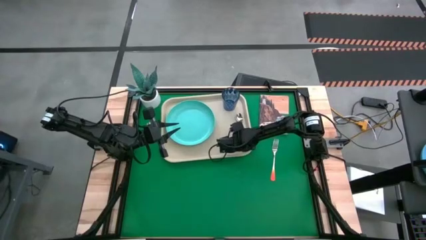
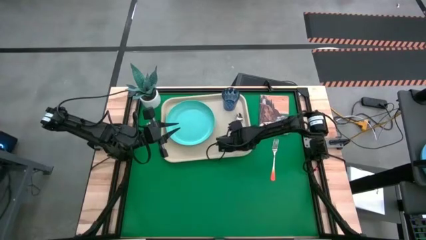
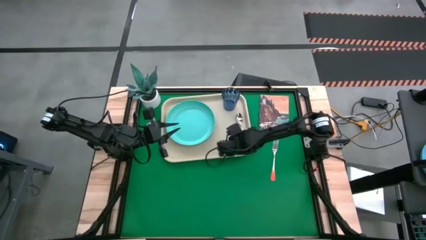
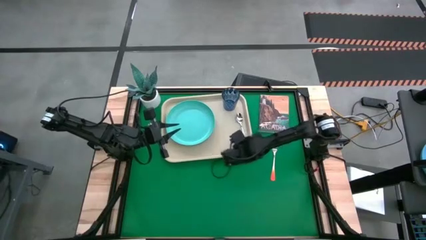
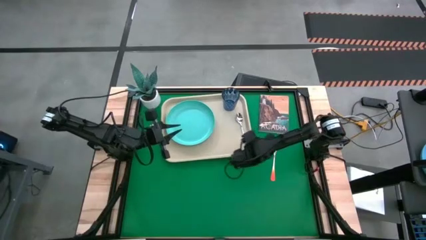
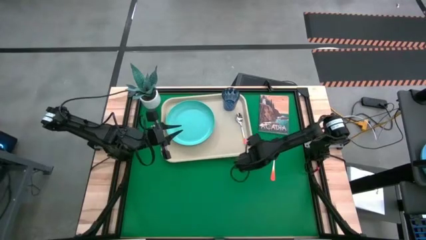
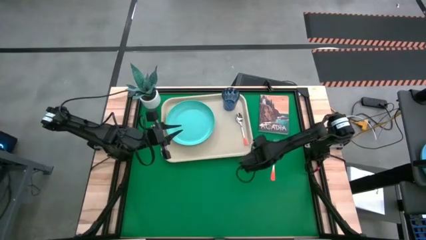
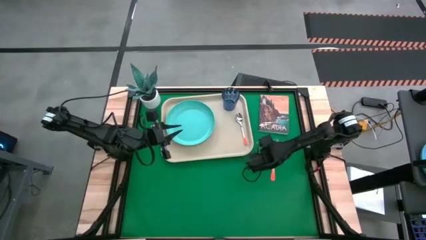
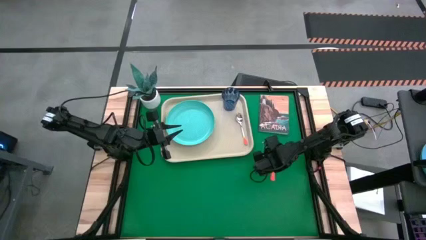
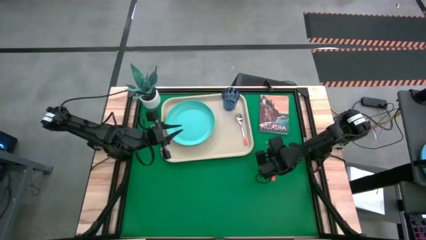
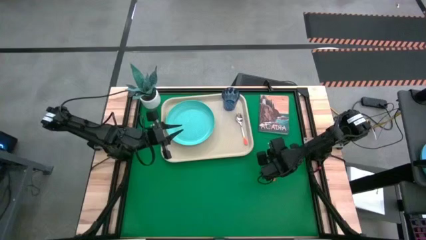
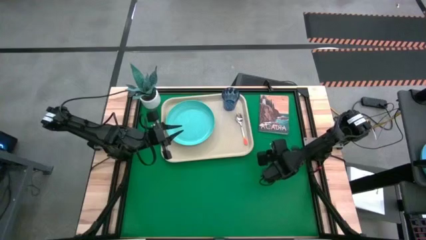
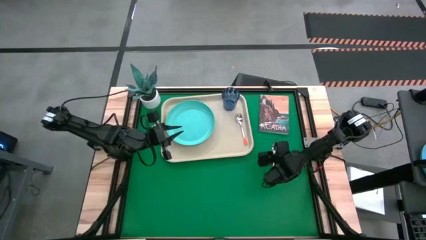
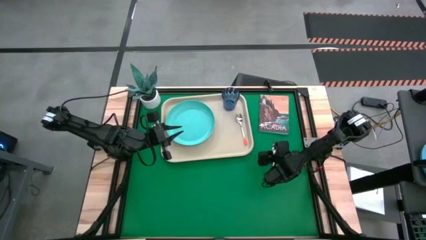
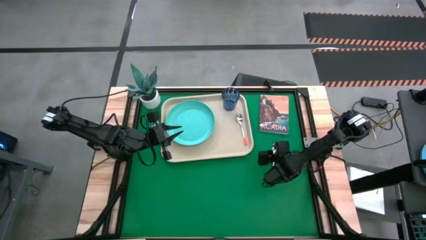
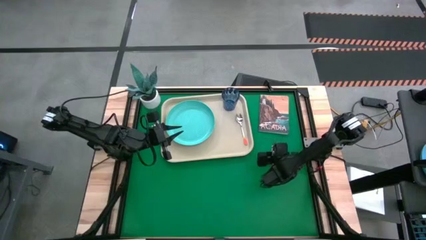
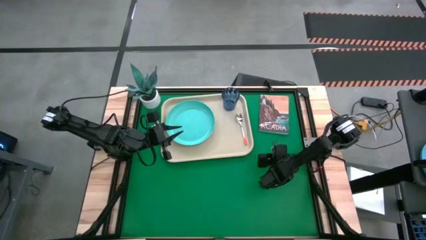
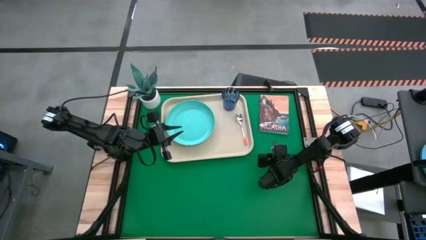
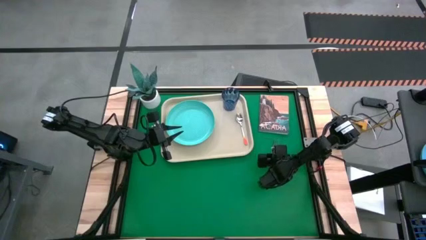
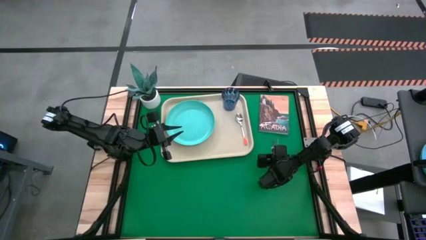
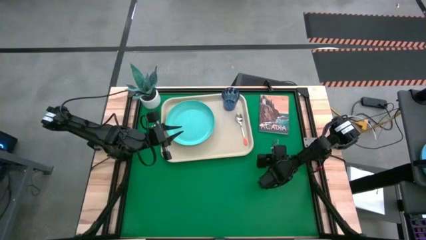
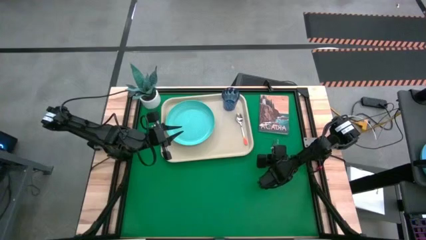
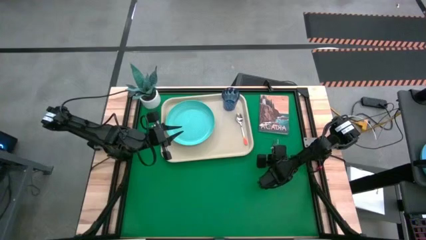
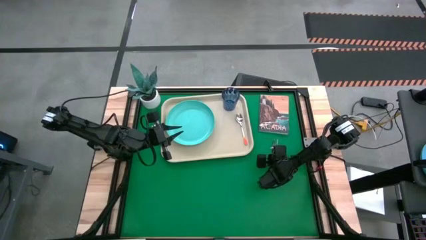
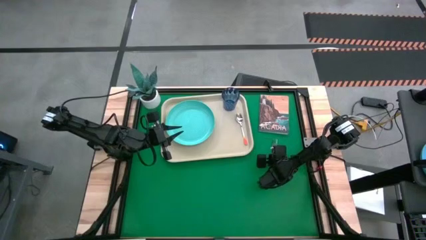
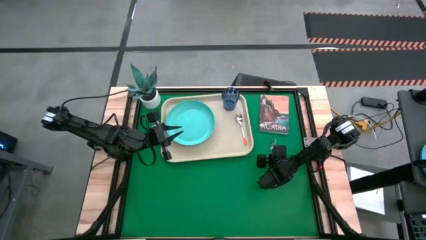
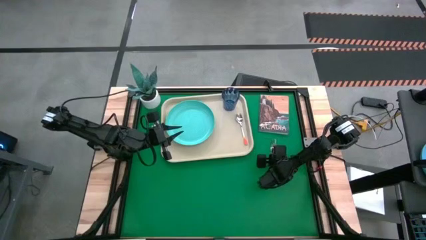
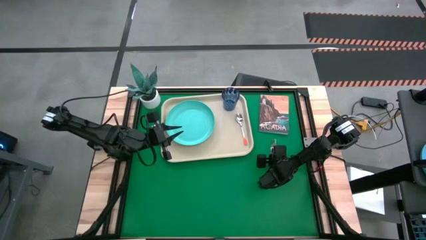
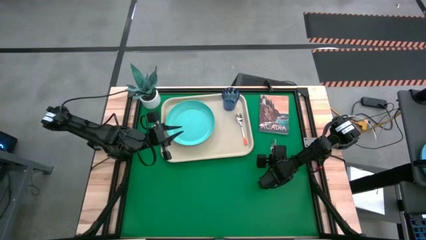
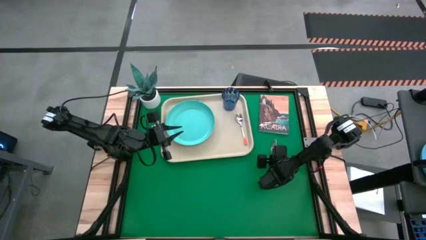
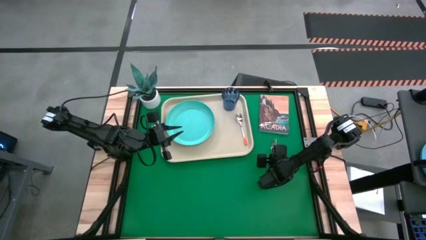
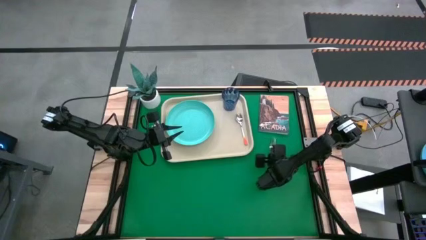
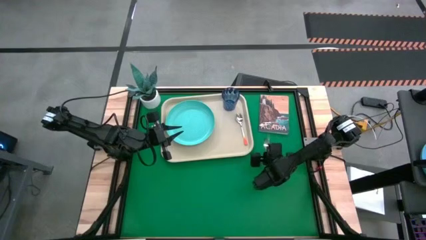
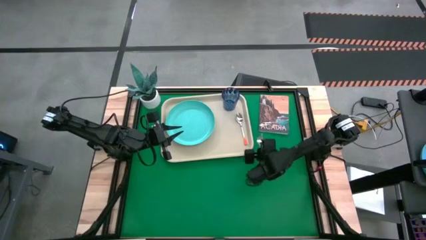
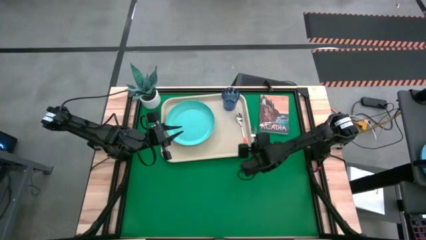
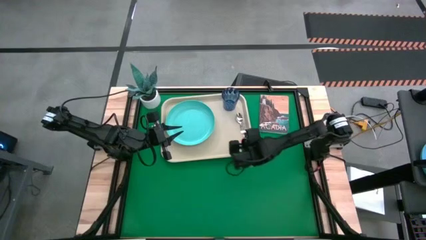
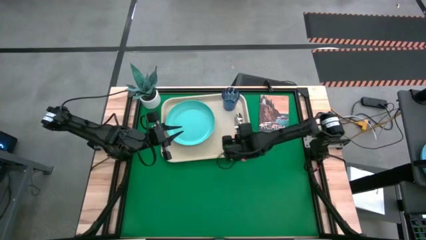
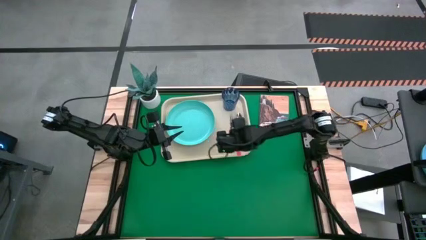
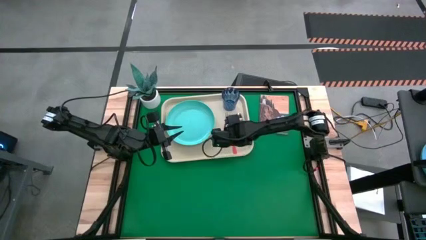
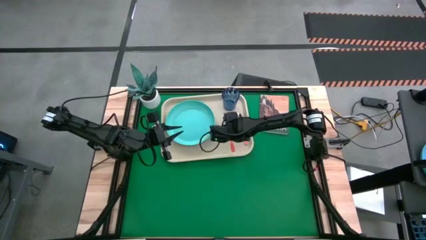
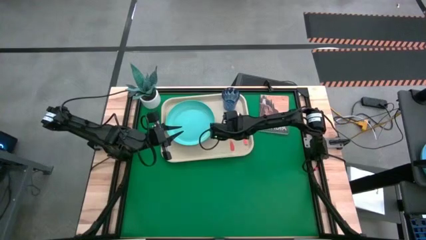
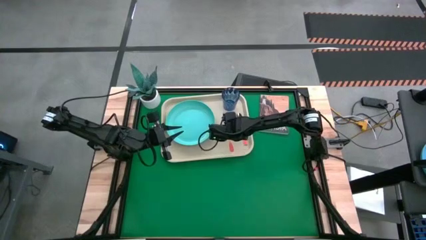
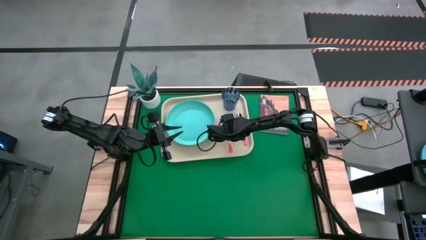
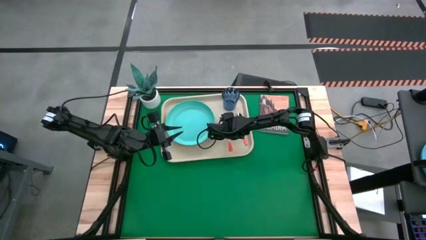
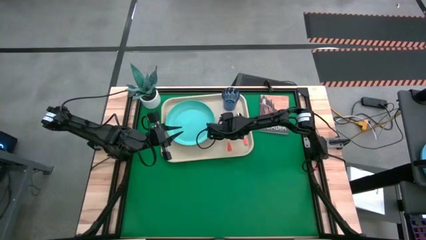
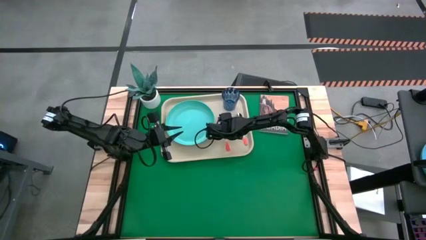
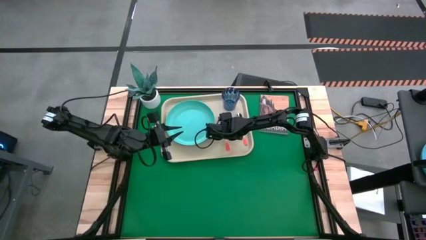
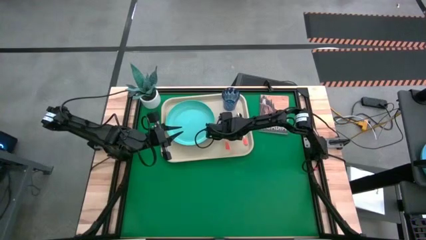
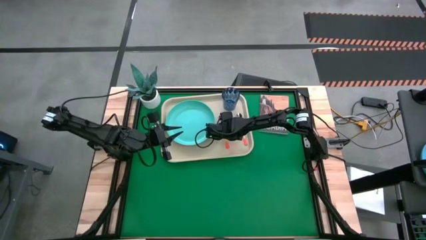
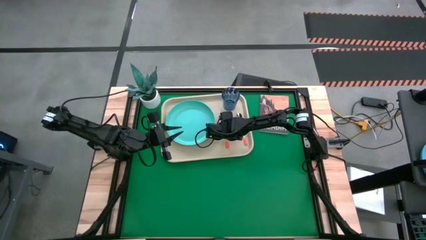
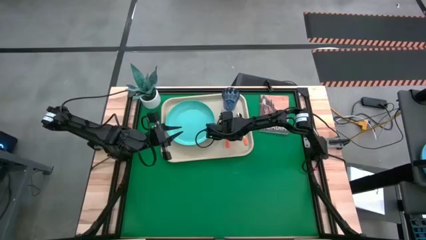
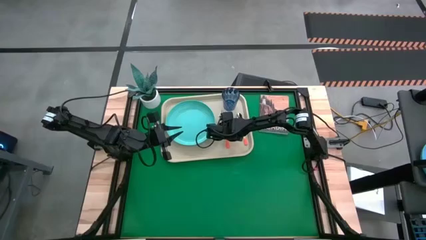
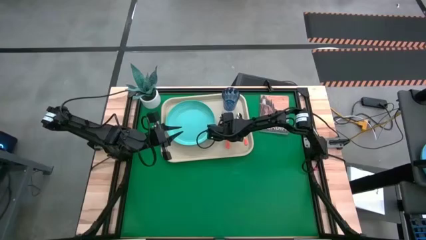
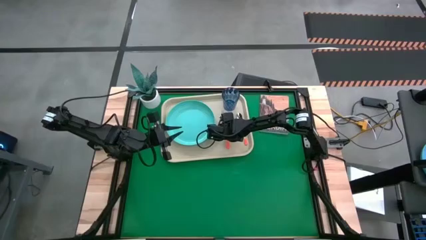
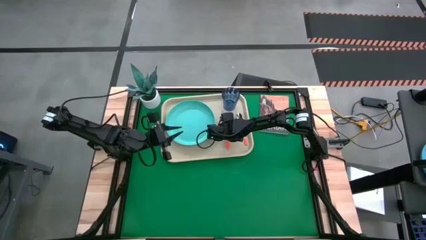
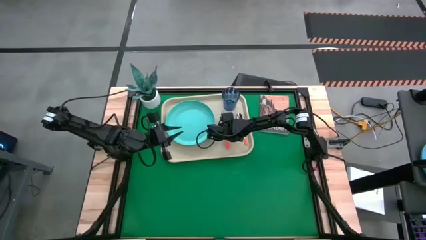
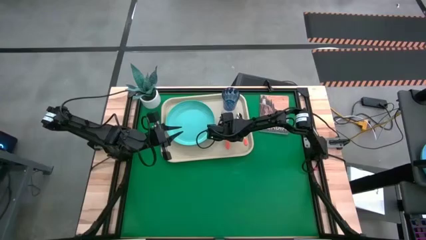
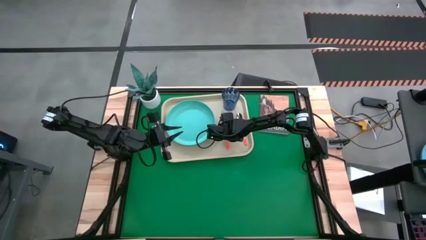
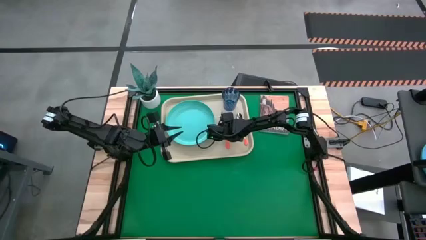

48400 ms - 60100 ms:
Task: Pick and place plate/cup/fork/spoon on tray
Put the orange fork on the light brown serving tray between the light blue plate and the orange spoon

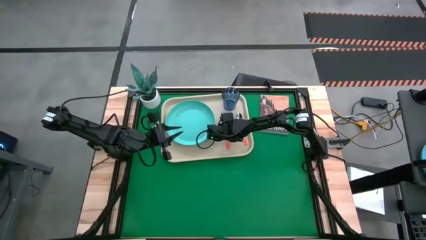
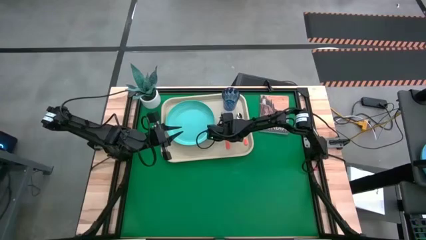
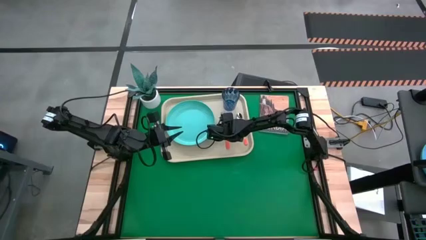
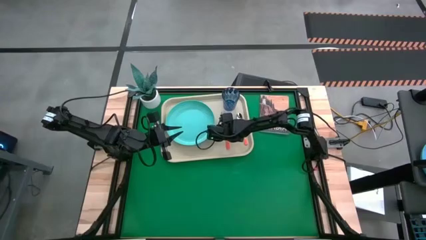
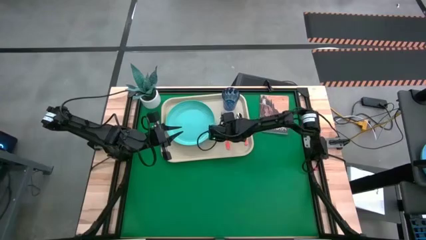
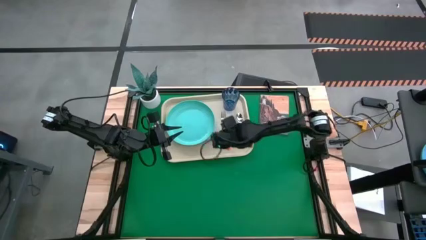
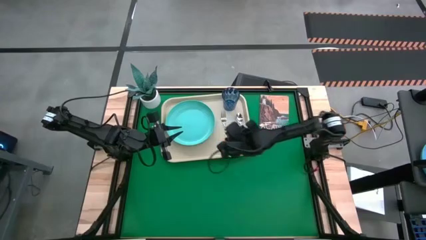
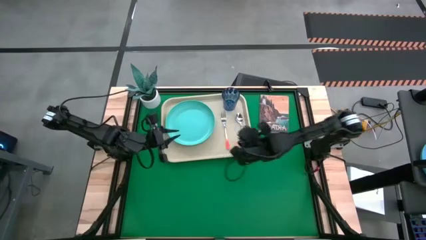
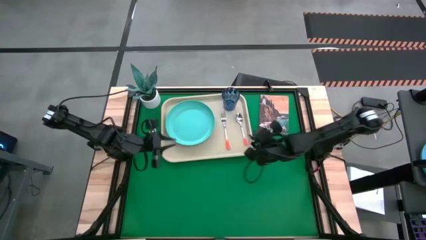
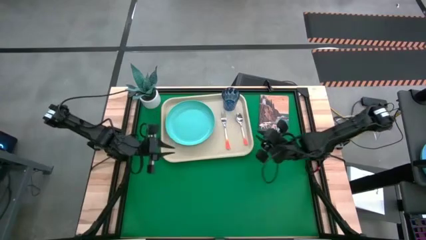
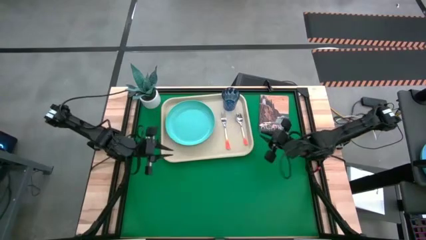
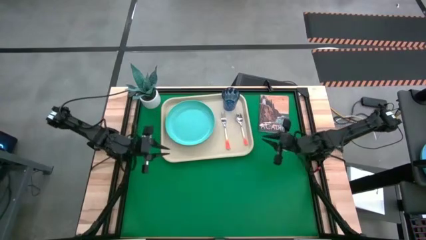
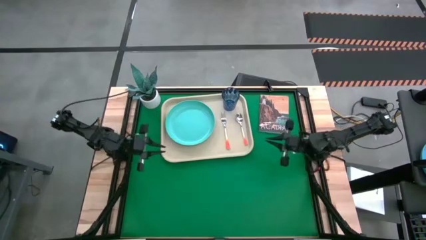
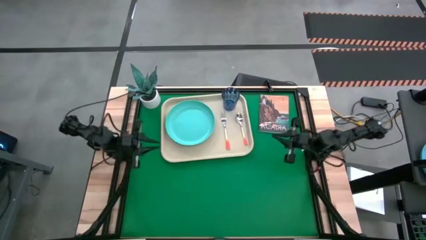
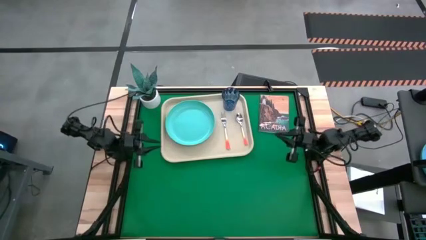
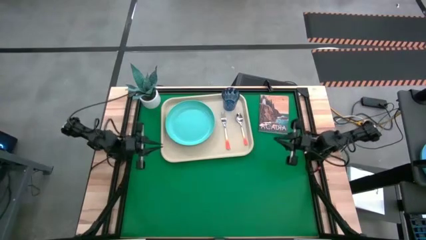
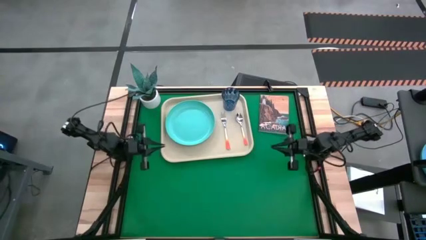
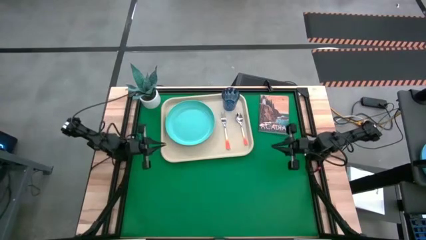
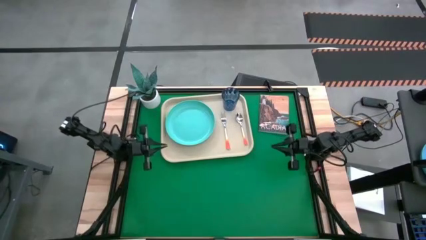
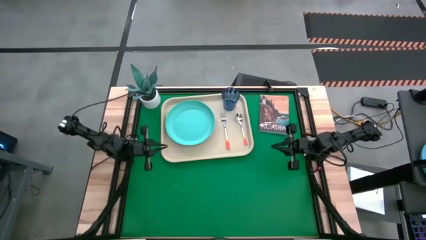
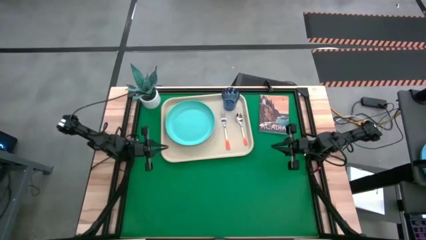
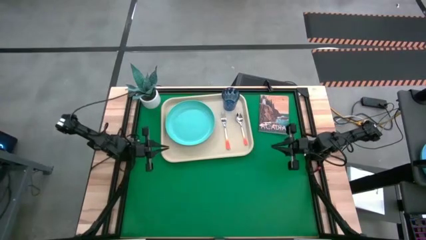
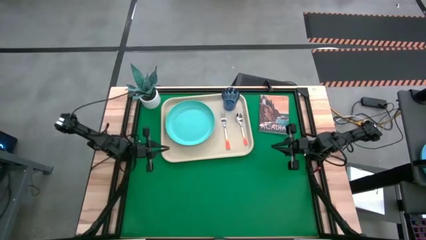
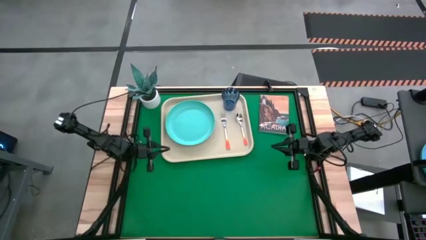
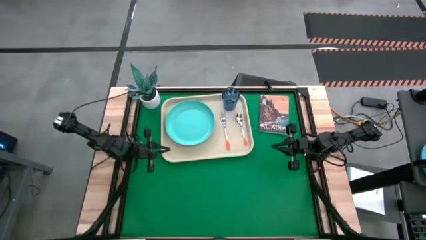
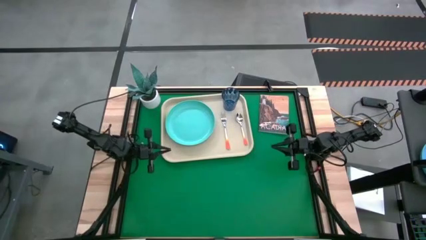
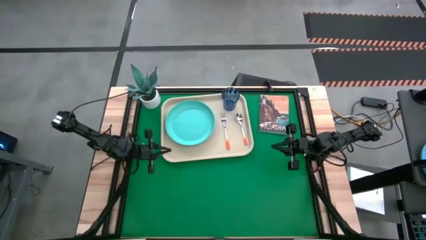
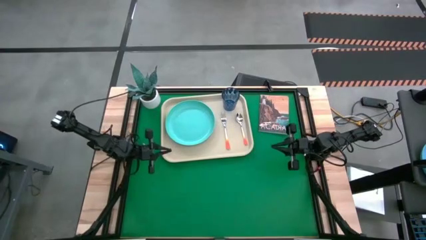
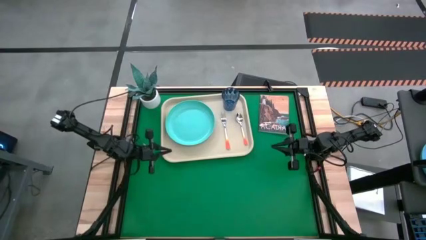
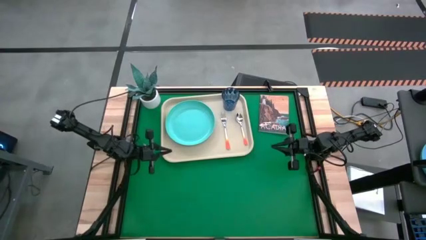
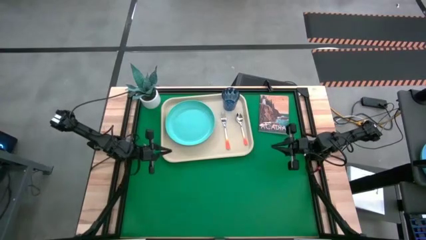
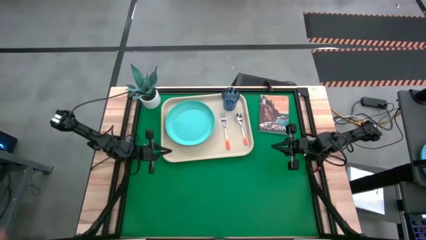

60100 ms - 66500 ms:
Return to home position
